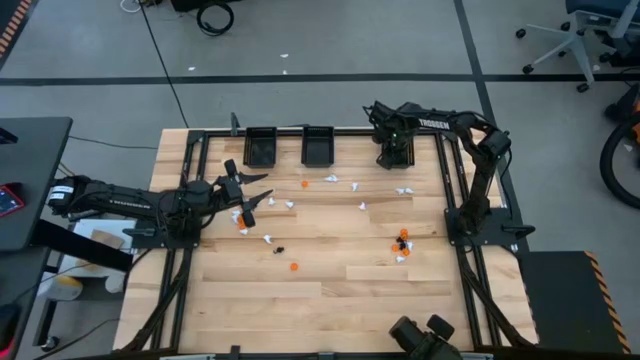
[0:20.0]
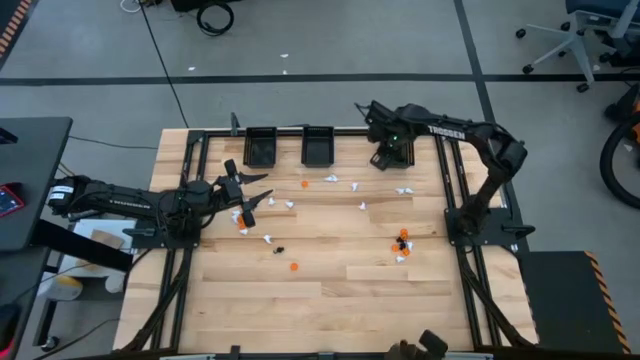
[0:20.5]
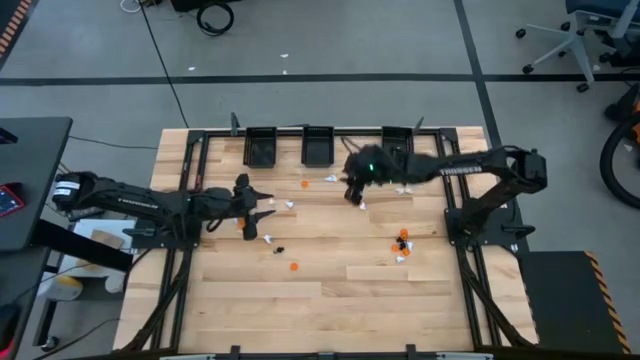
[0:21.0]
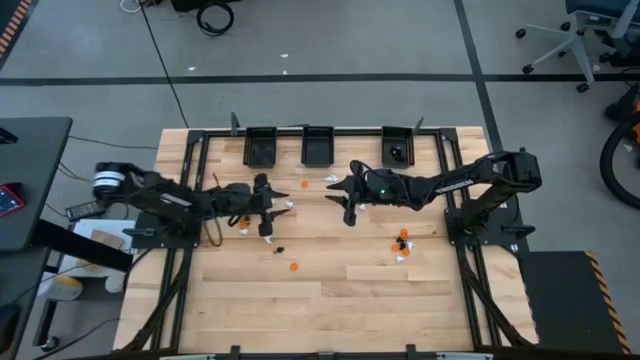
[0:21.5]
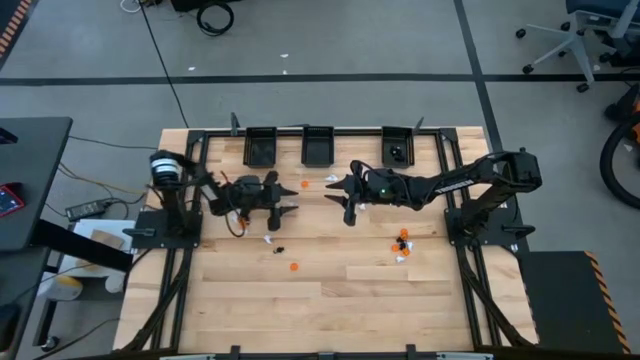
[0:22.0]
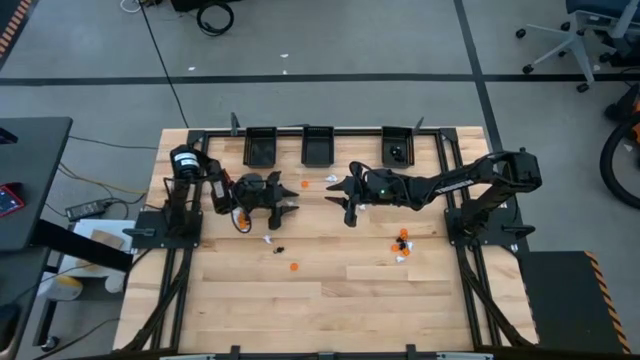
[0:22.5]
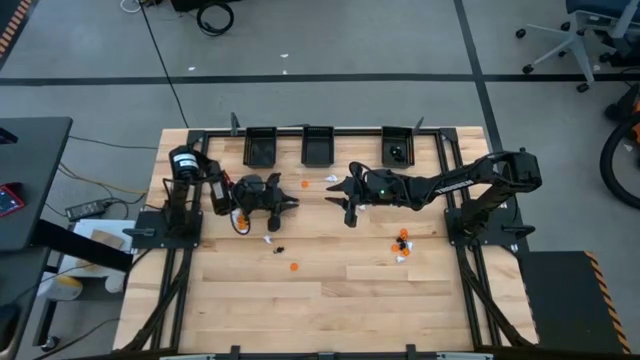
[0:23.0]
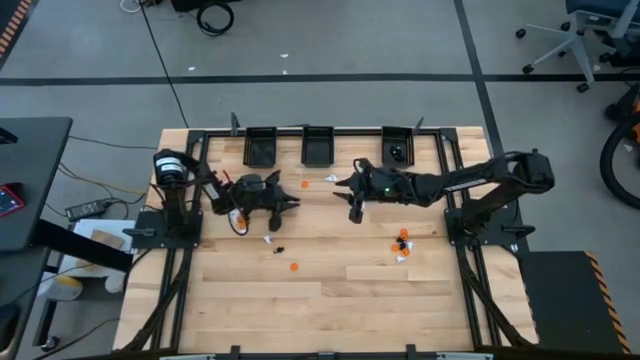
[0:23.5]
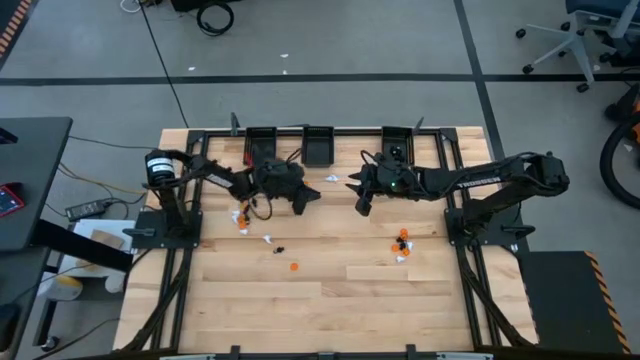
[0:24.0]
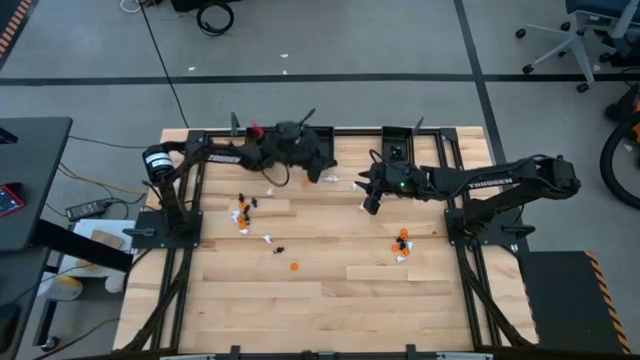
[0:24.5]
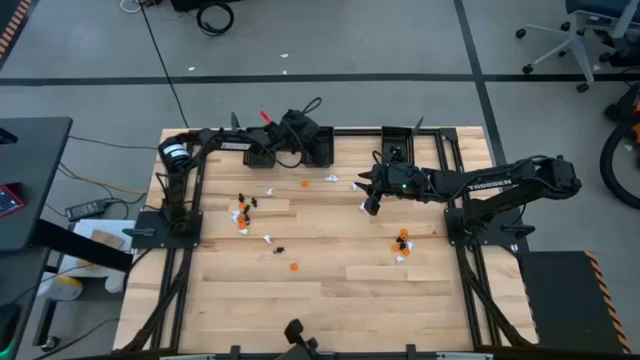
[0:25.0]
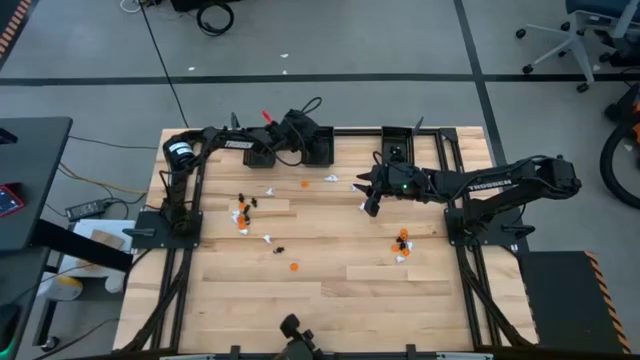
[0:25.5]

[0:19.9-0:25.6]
Task: Sort Halloween decoration
Put the white ghost toy into the middle black bin

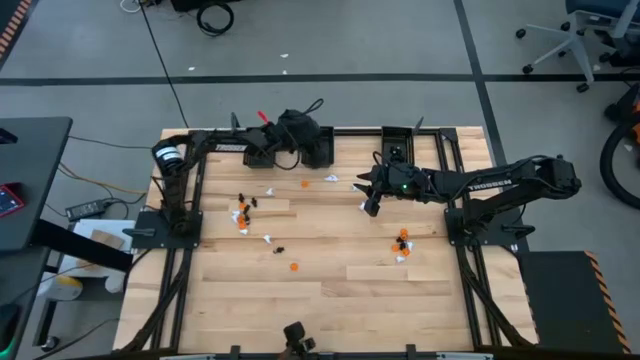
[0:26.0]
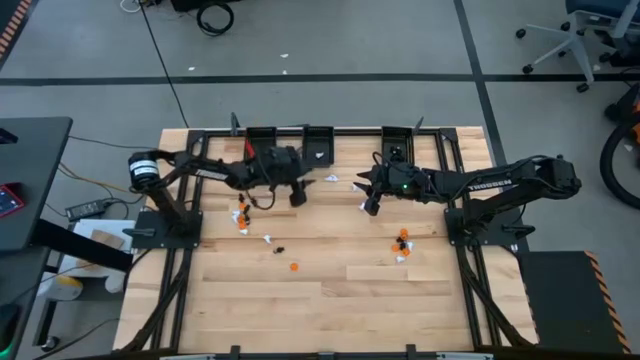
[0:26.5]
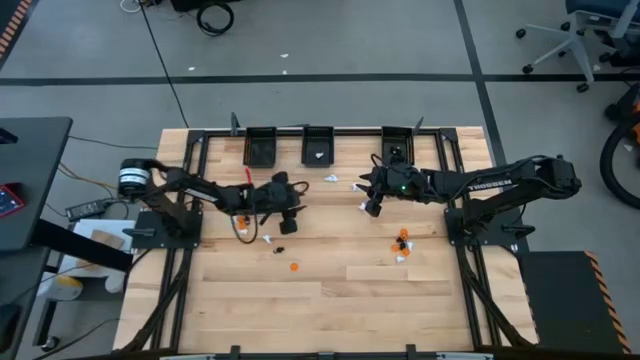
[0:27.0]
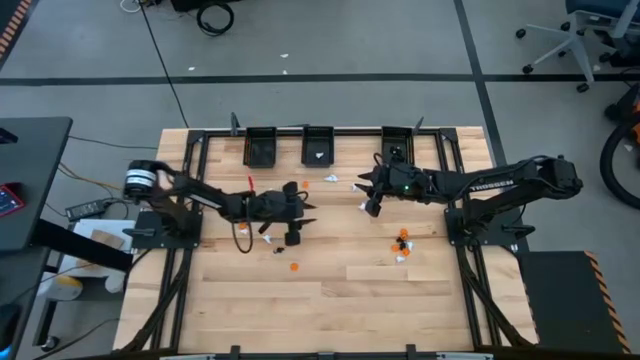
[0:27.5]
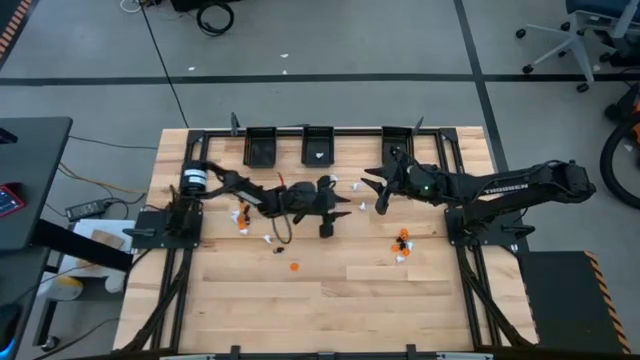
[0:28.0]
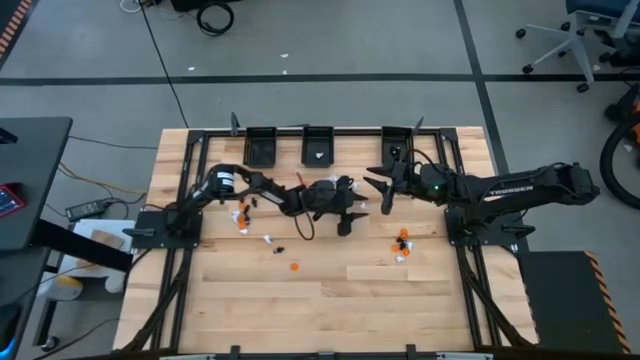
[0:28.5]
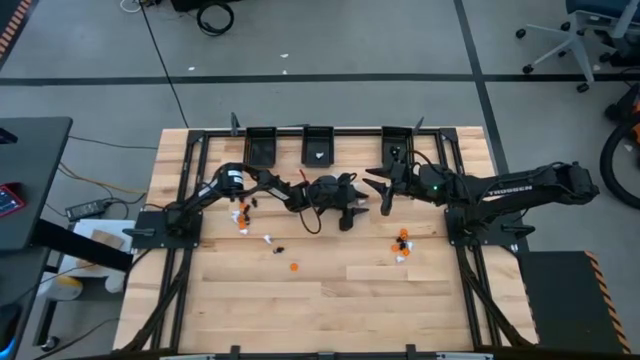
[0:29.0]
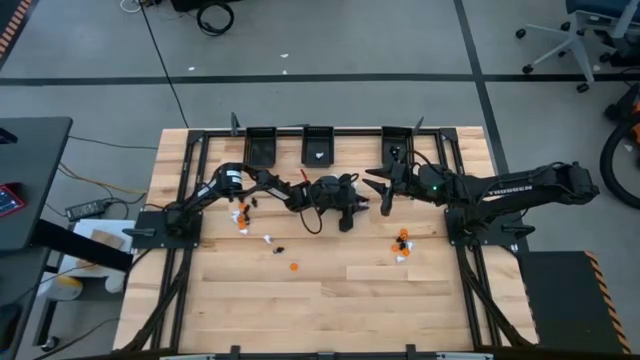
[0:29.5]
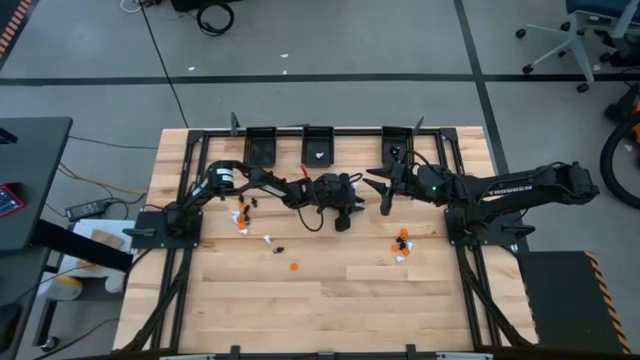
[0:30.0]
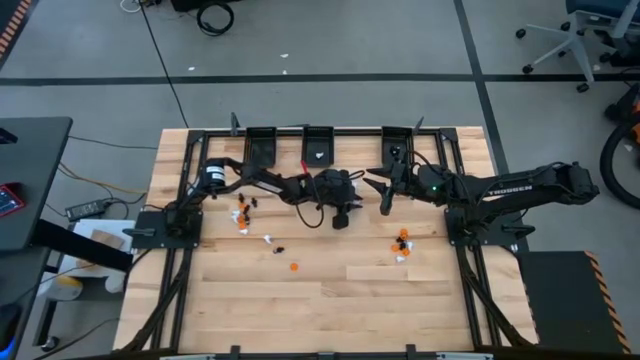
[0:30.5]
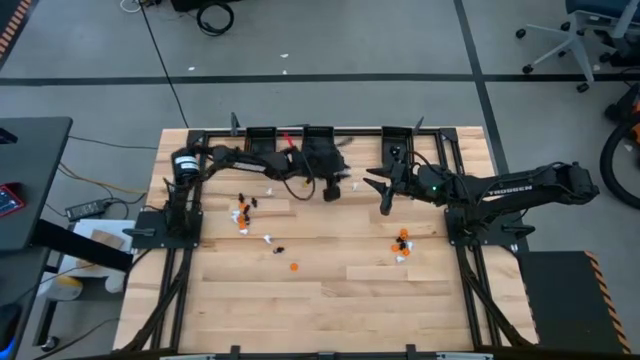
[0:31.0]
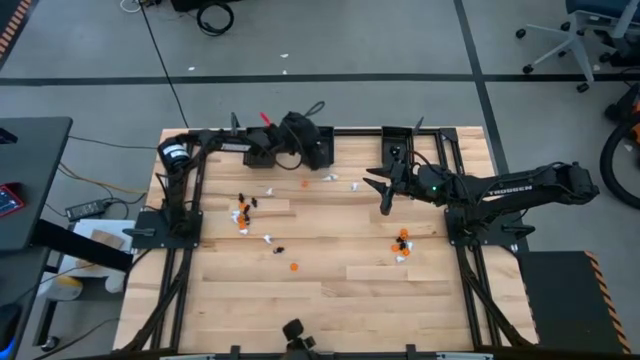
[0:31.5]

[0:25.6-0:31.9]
Put the white ghost toy into the middle black bin

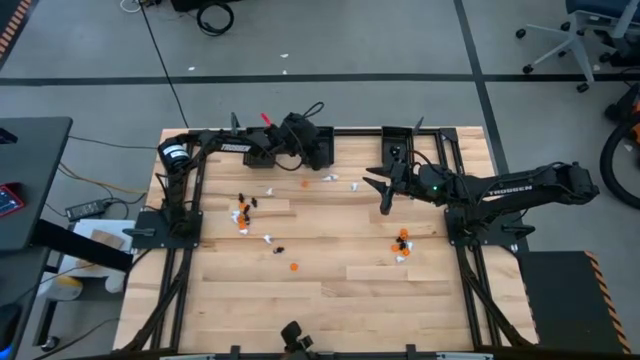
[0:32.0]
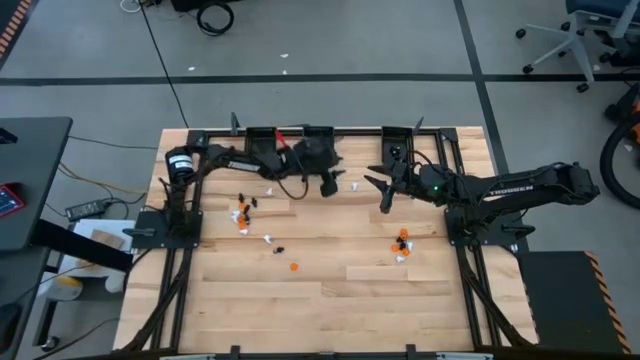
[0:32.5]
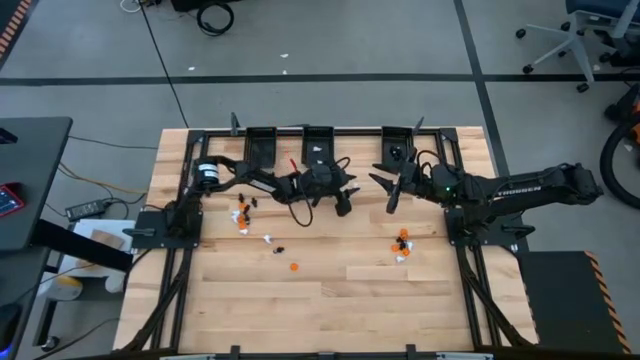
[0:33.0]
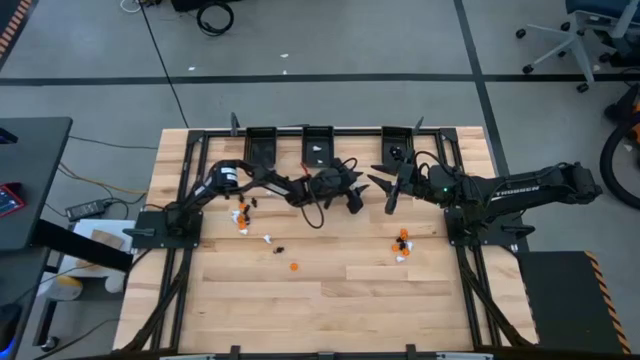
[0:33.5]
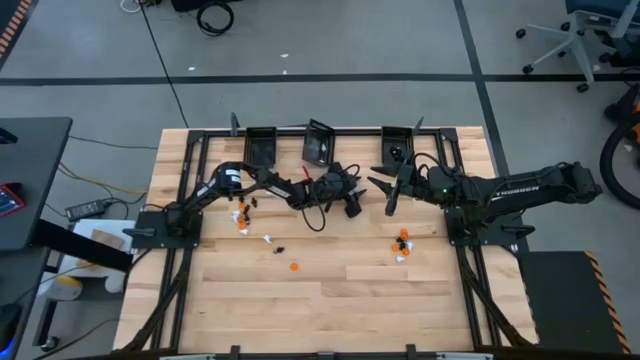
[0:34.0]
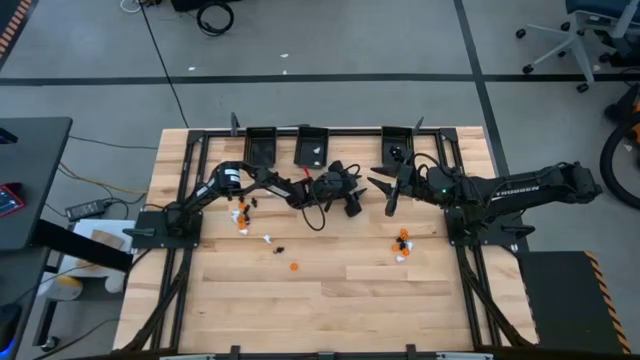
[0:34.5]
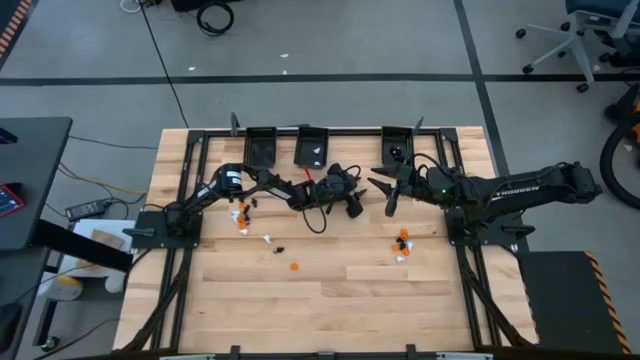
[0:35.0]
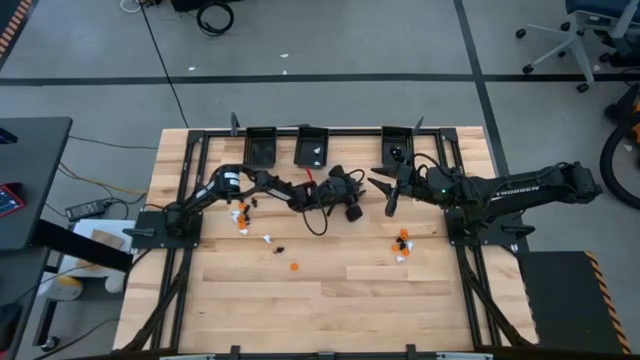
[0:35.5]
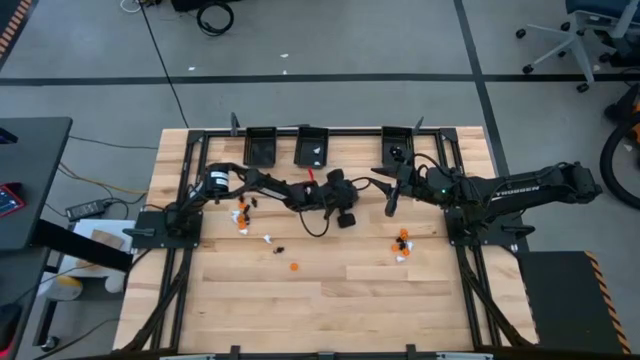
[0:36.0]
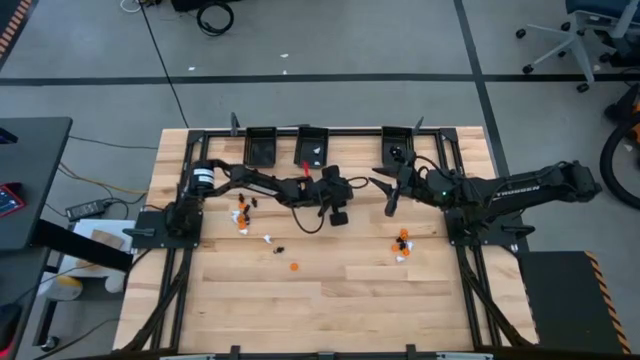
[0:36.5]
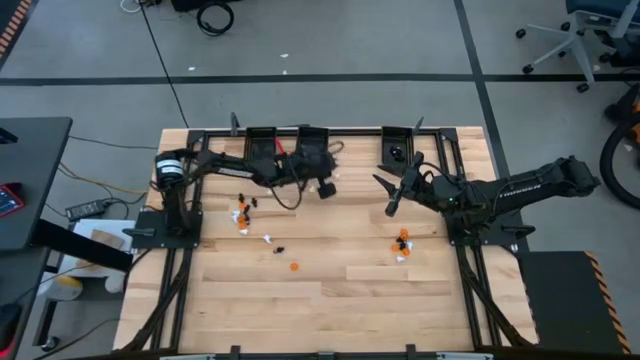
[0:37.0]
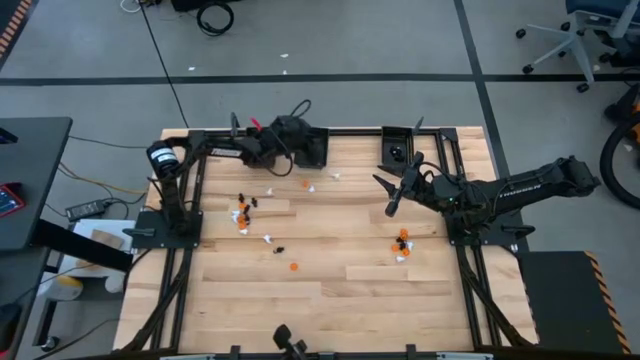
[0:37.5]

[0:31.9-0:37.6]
Put the white ghost toy into the middle black bin

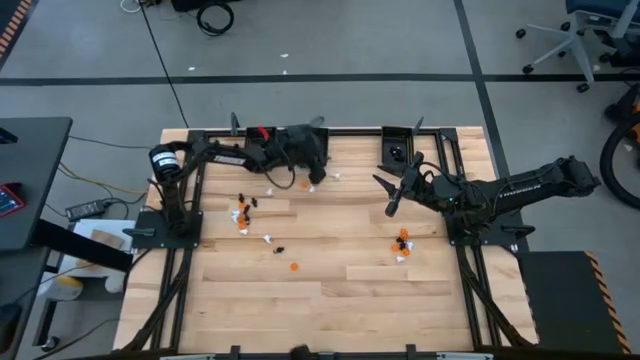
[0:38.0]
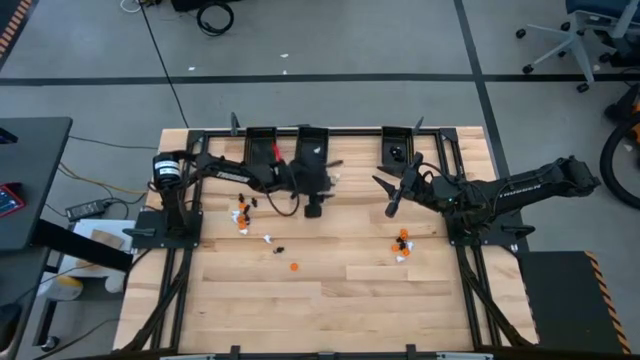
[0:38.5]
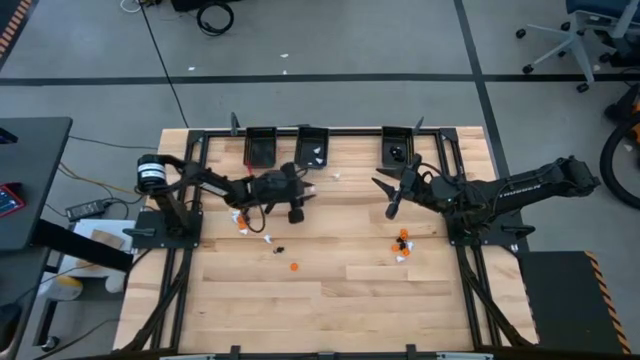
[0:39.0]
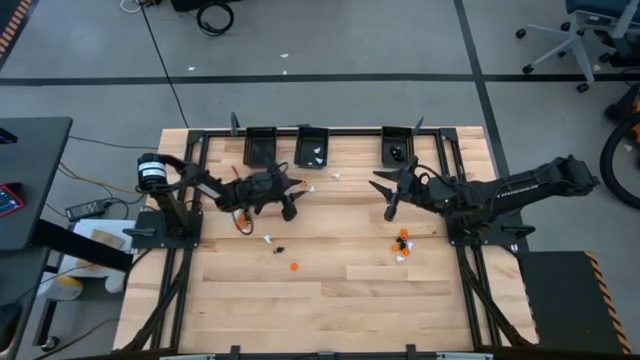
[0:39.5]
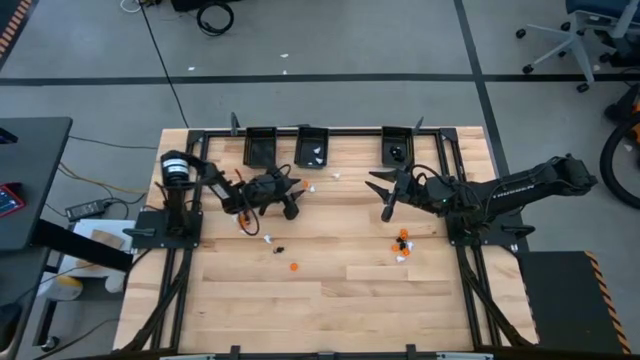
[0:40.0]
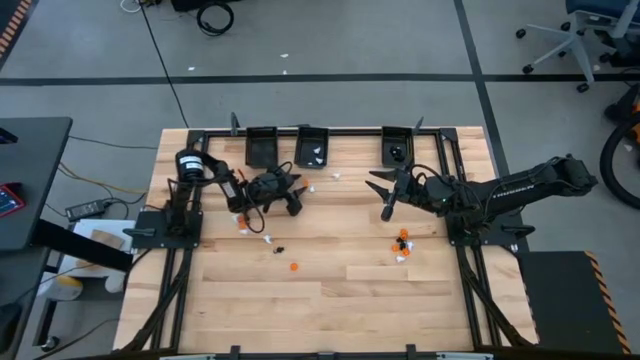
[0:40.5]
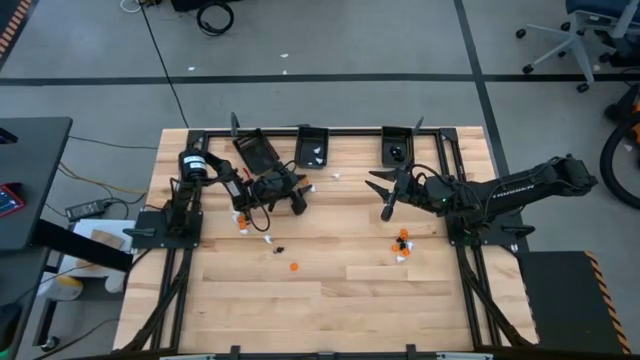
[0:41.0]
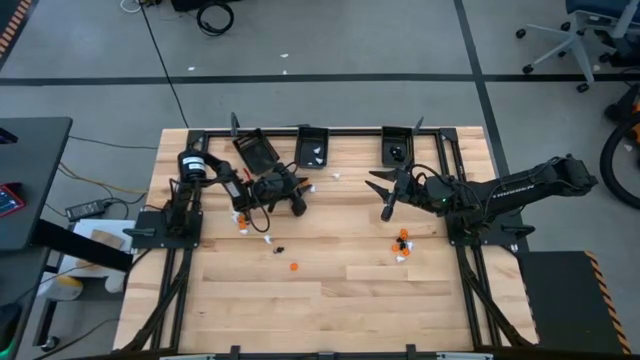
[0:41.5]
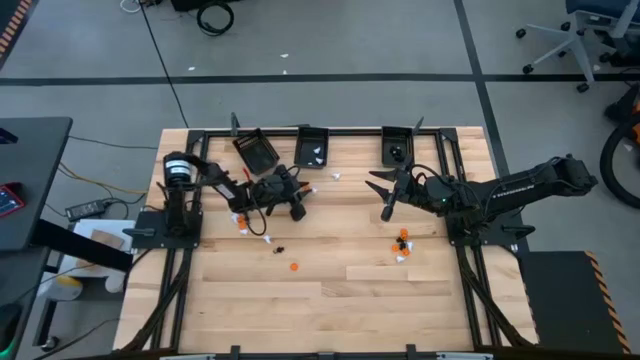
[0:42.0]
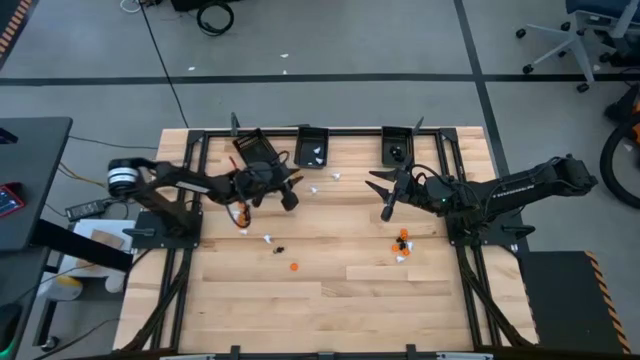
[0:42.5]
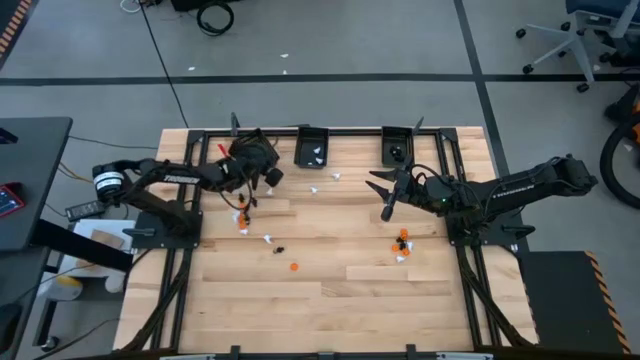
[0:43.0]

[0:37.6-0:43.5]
Put the orange pumpkin toy into the left black bin
